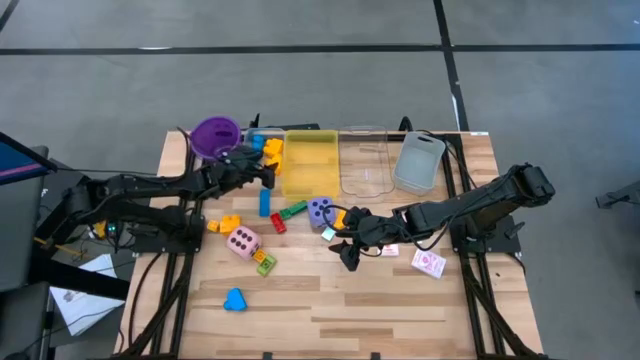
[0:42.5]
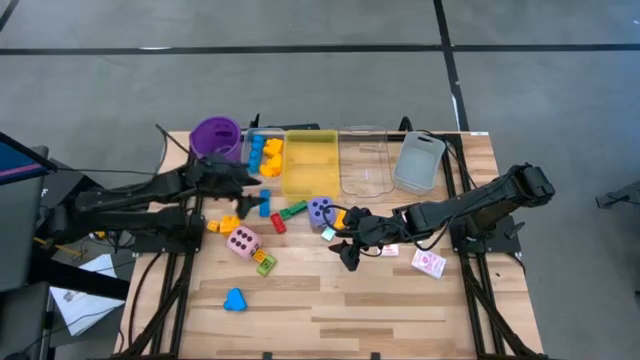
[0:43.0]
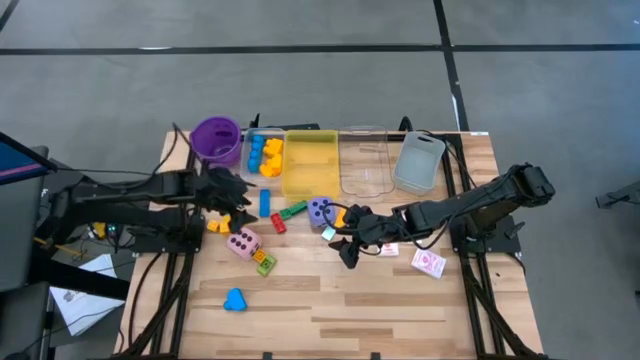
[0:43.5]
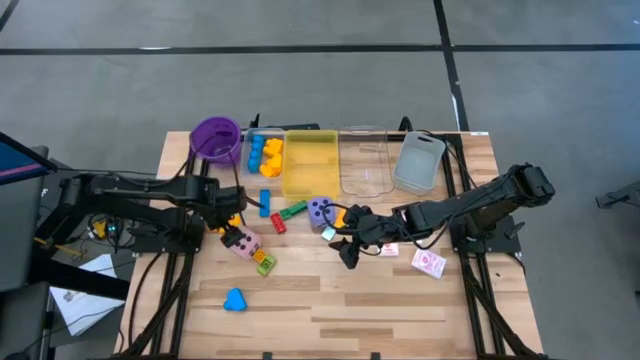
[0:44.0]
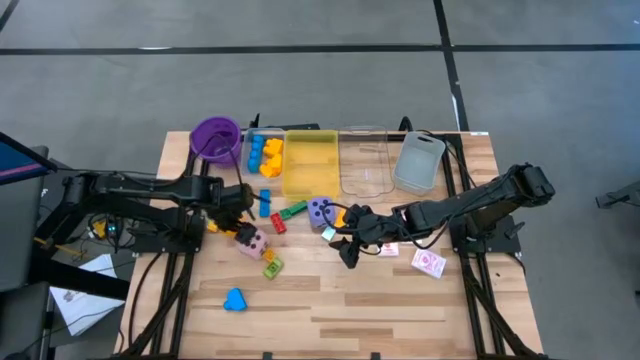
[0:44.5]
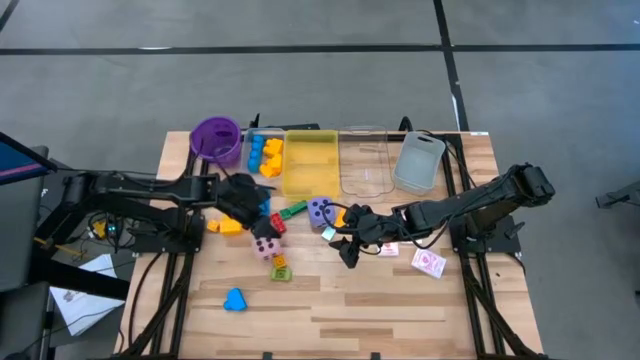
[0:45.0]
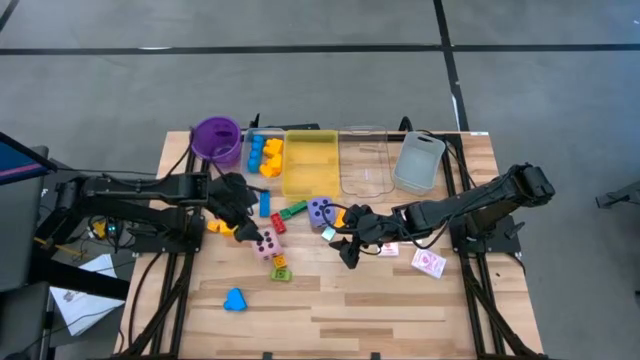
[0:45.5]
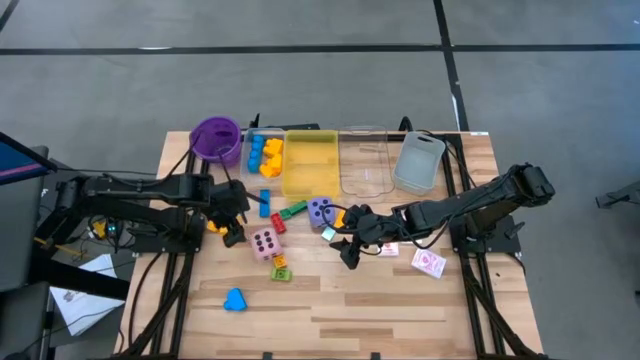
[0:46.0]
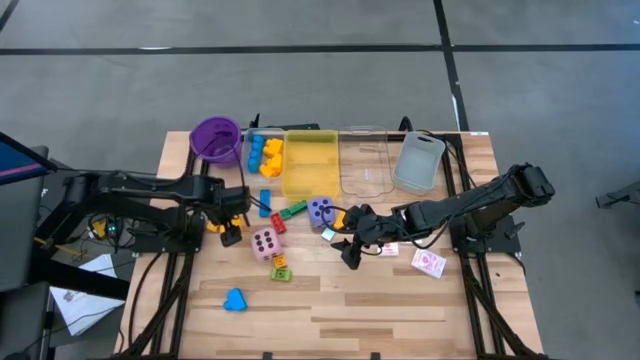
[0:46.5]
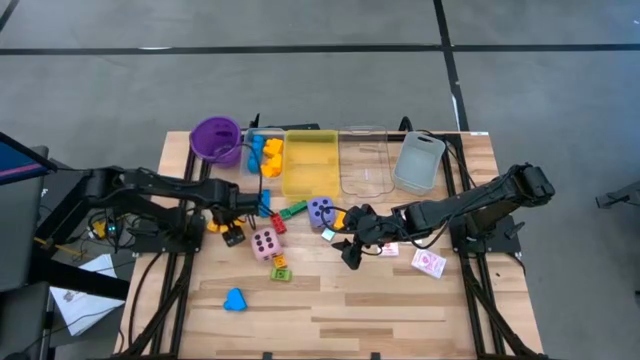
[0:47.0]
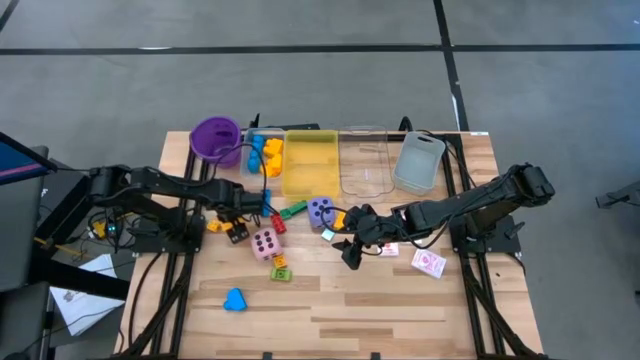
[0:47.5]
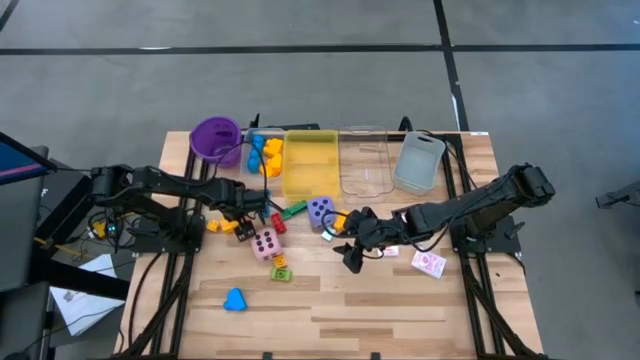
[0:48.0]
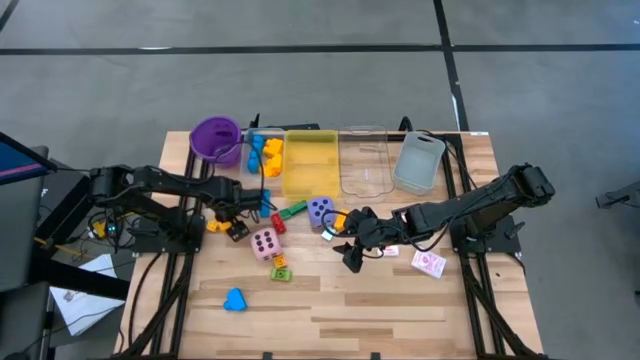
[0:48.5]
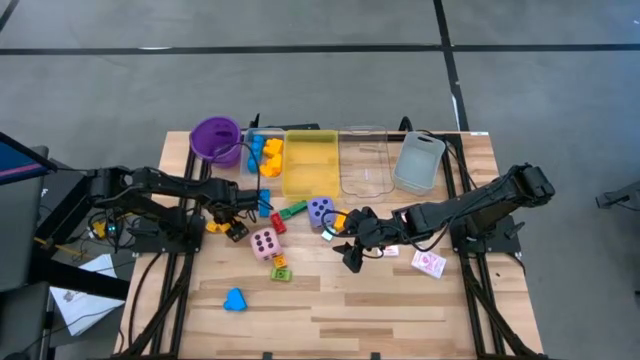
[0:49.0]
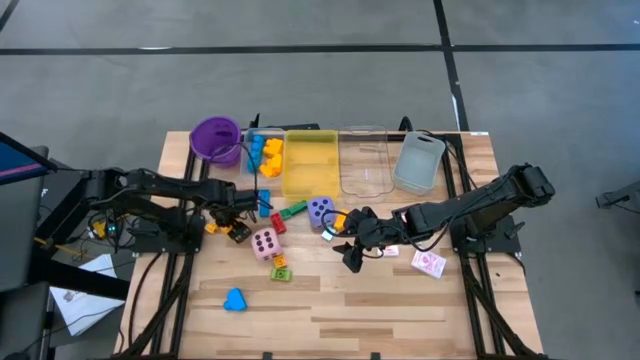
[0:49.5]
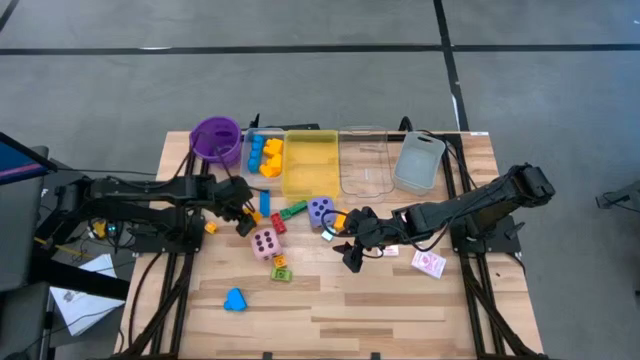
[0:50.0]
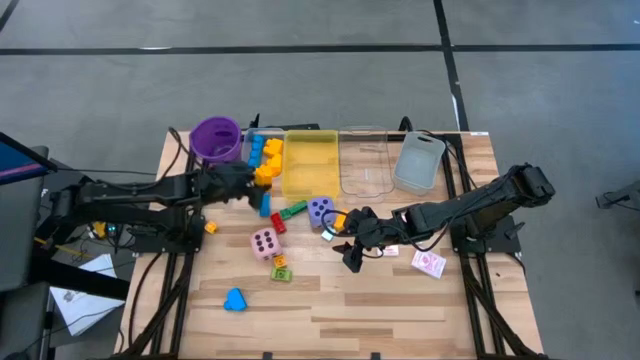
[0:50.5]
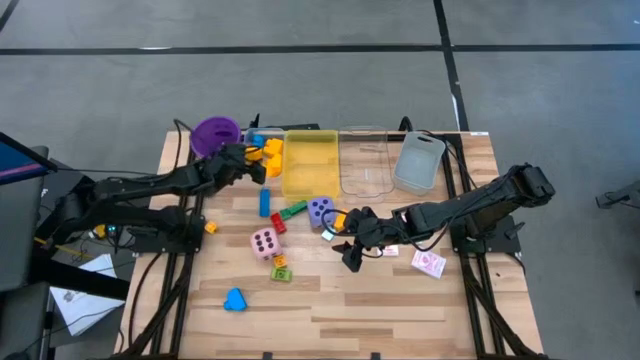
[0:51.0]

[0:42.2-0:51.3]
Task: Pick & Place Toys
Put the left yellow stud game piece into the left transparent bin

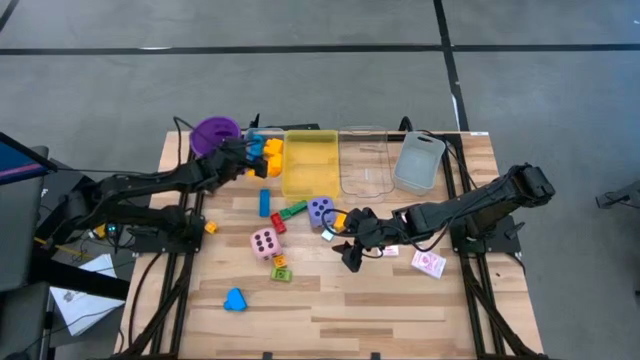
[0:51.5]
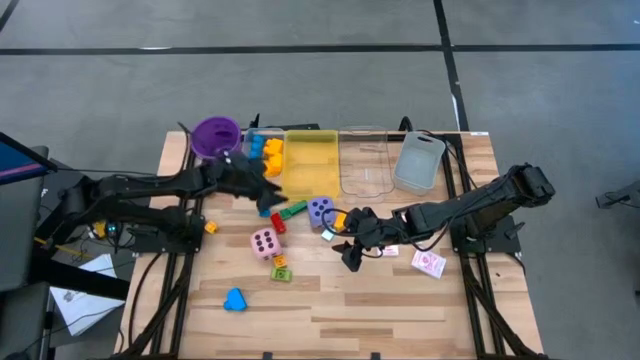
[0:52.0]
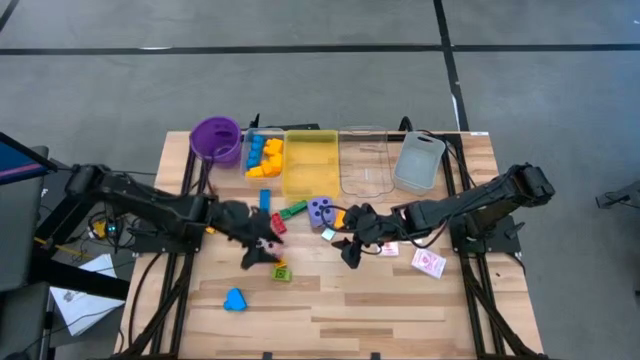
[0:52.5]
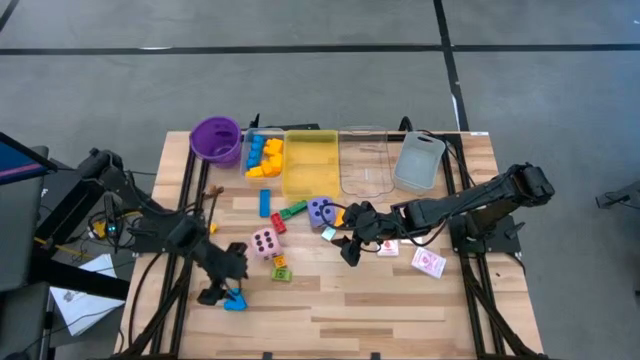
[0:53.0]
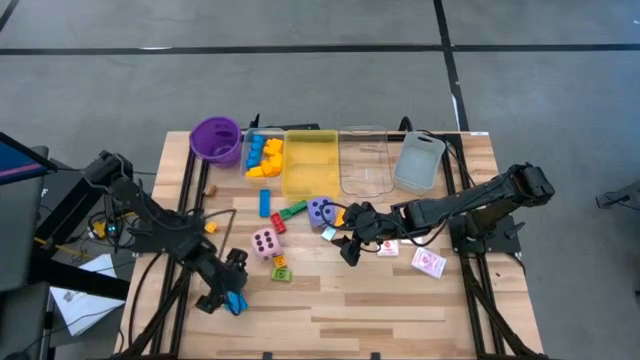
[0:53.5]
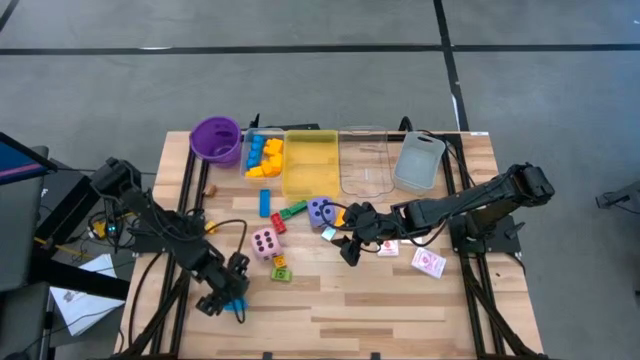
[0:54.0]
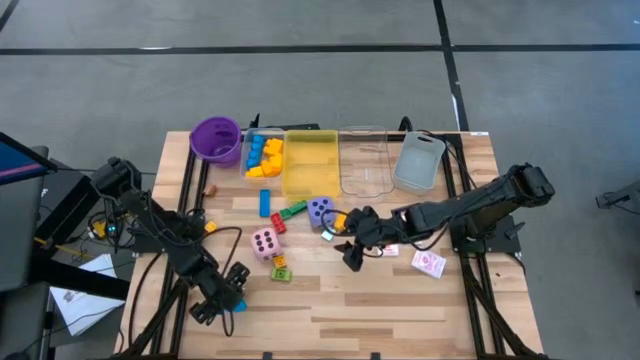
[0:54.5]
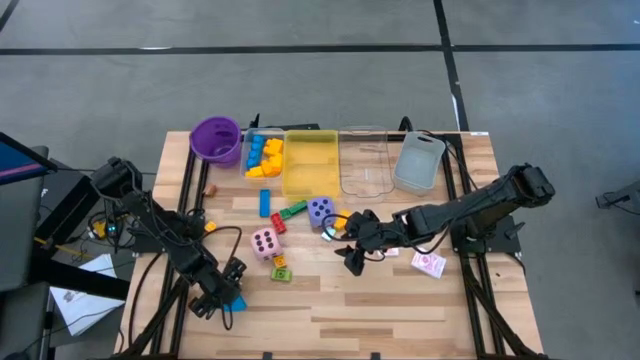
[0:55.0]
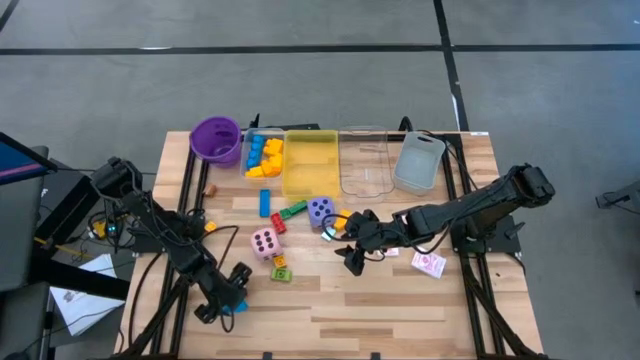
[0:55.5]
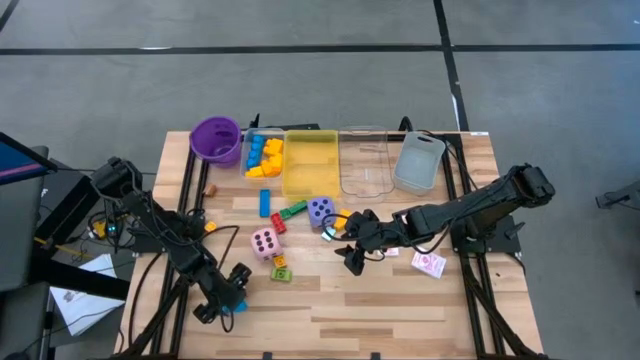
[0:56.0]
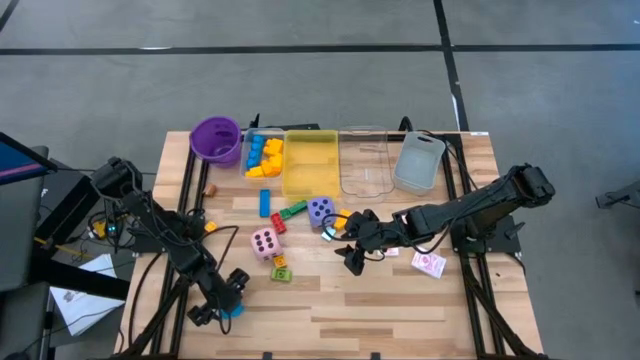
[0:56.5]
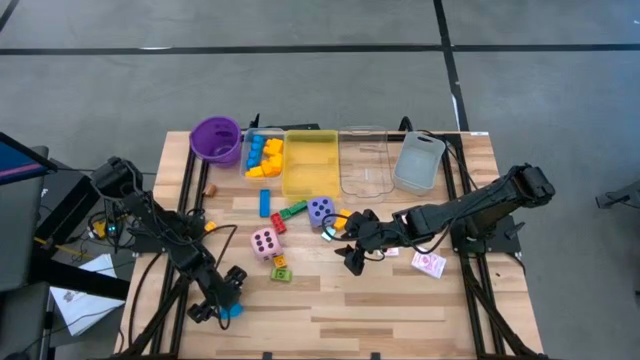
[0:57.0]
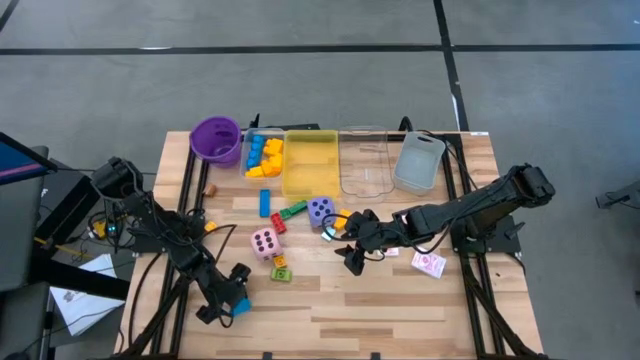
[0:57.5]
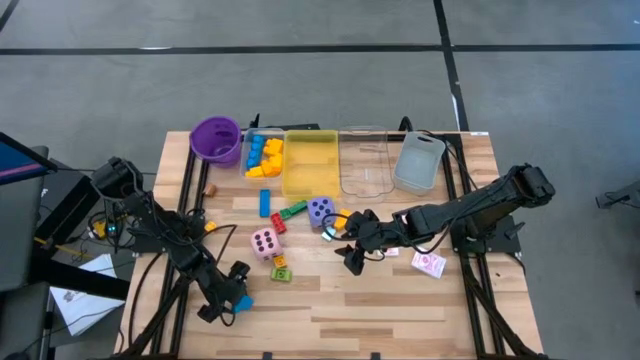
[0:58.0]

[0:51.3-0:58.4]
Put the bottom blue stud game piece into the left transparent bin

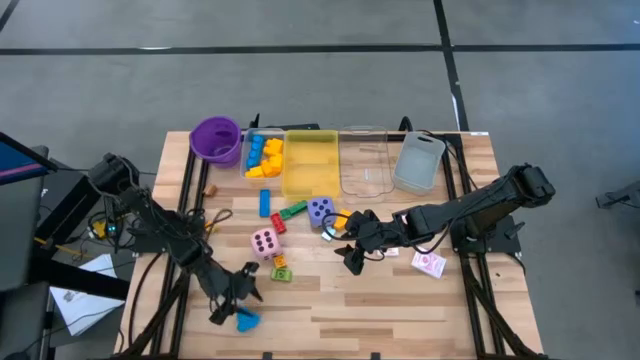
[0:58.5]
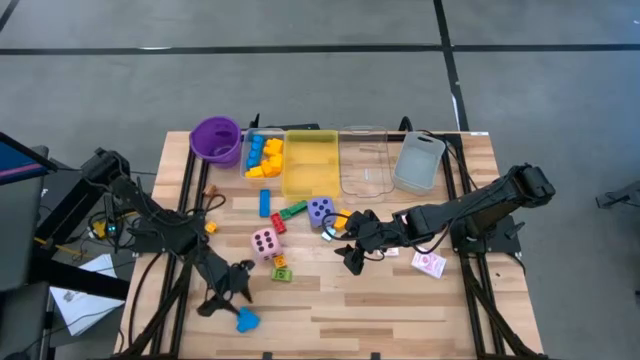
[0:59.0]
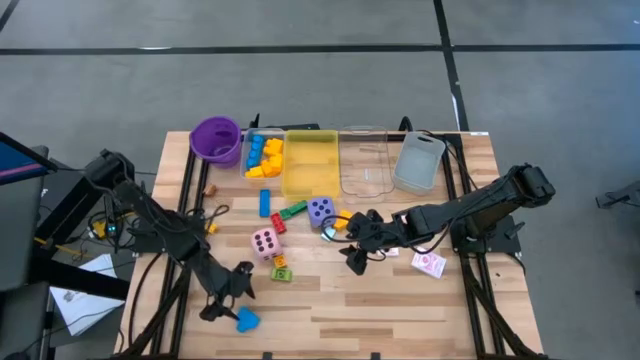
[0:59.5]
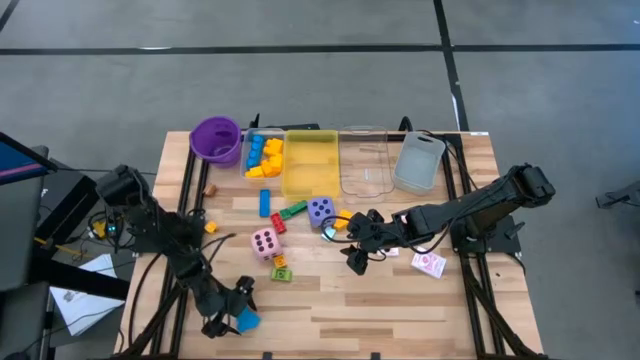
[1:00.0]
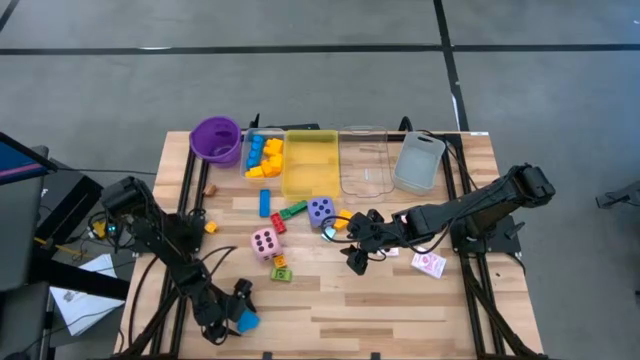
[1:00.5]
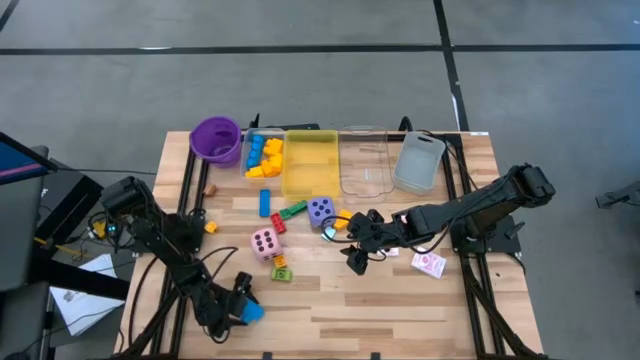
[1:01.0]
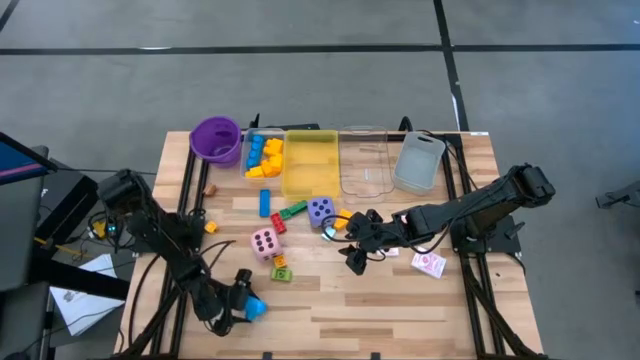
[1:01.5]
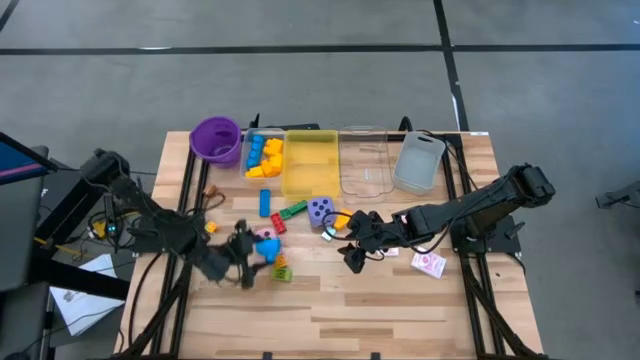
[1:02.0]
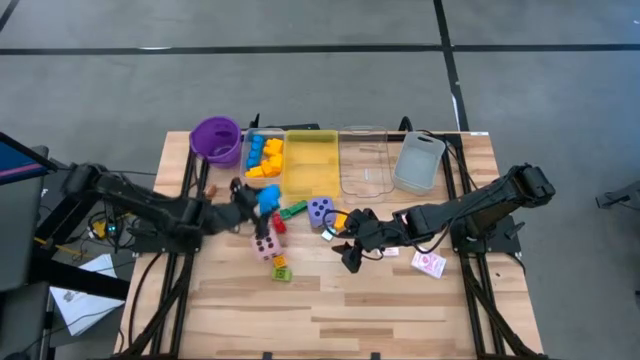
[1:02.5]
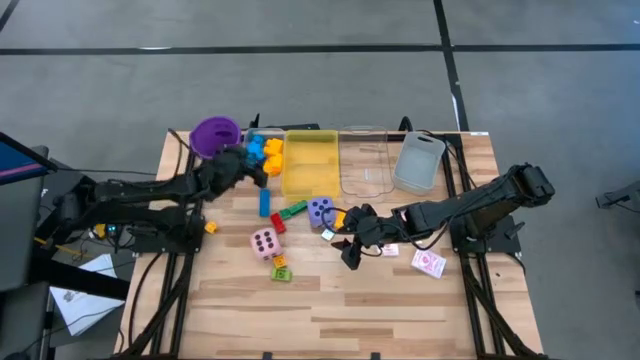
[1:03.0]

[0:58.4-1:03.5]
Put the bottom blue stud game piece into the left transparent bin
